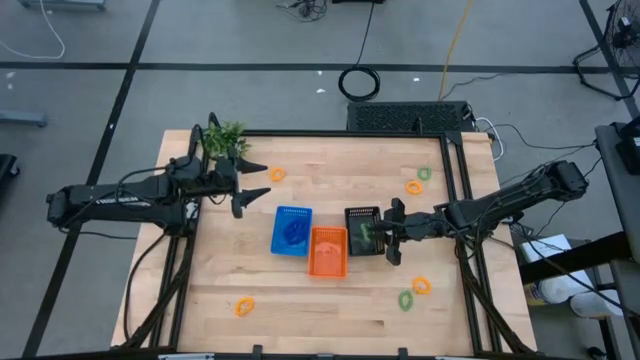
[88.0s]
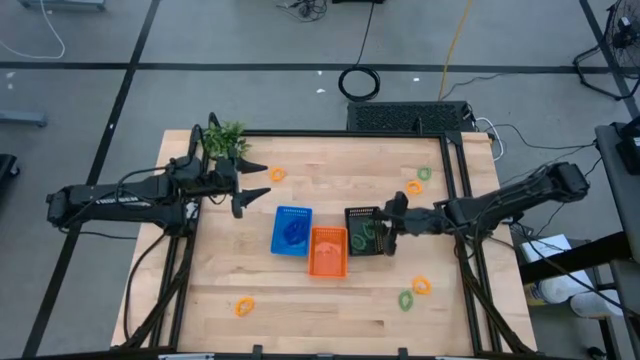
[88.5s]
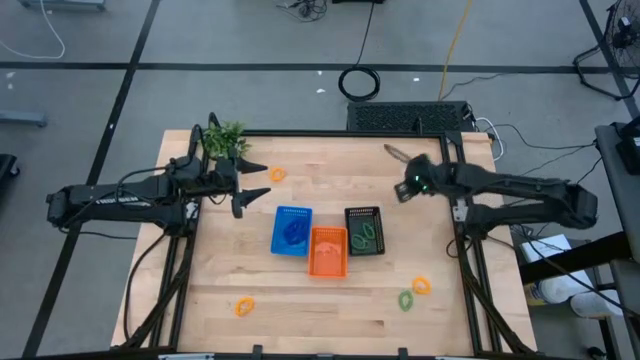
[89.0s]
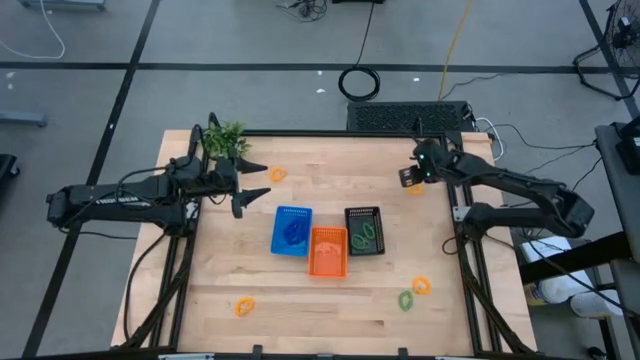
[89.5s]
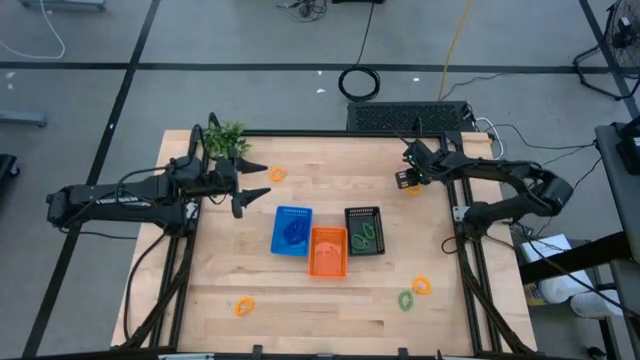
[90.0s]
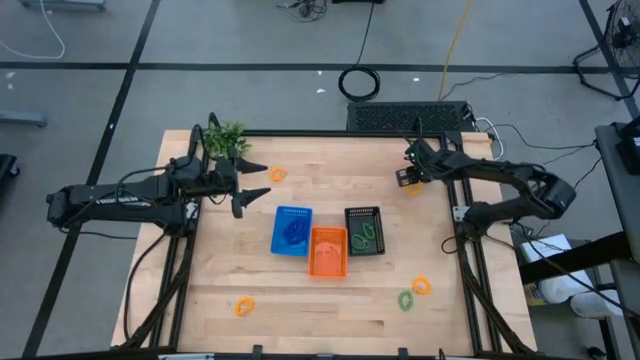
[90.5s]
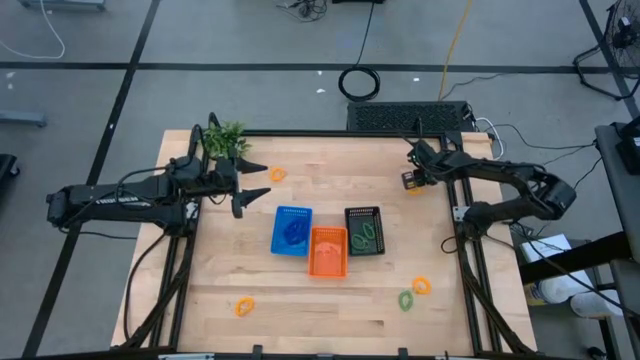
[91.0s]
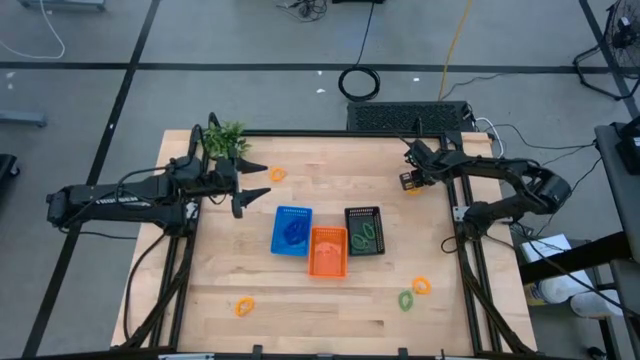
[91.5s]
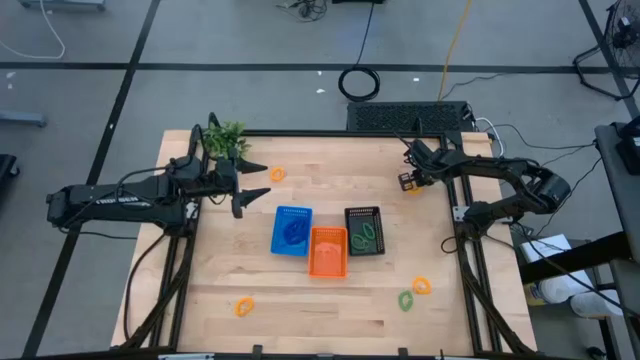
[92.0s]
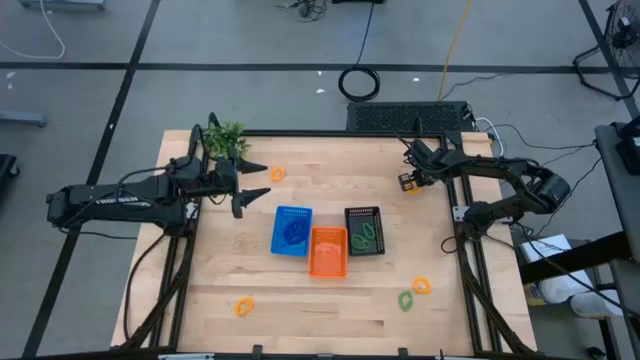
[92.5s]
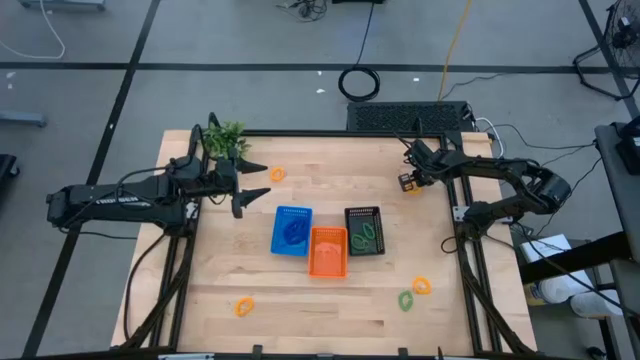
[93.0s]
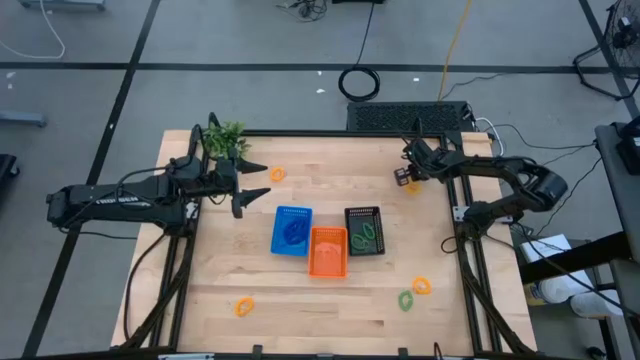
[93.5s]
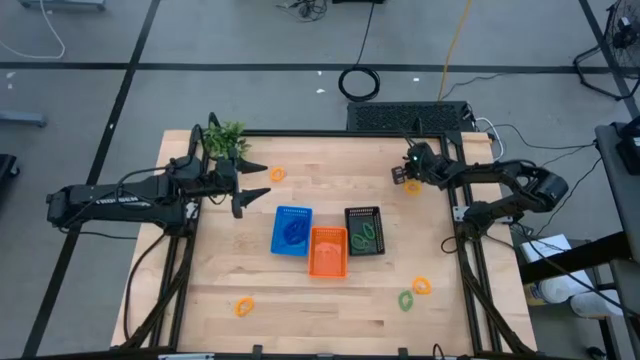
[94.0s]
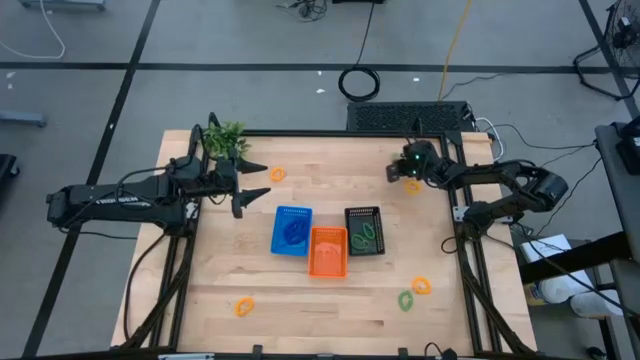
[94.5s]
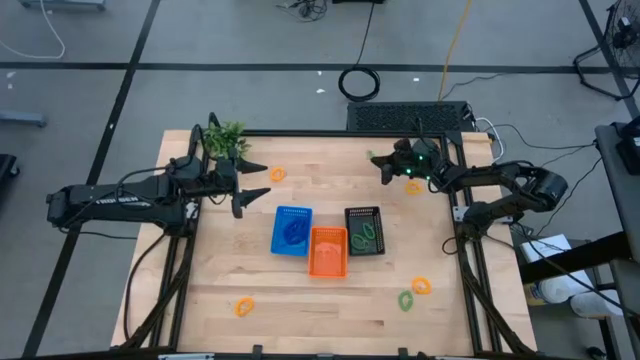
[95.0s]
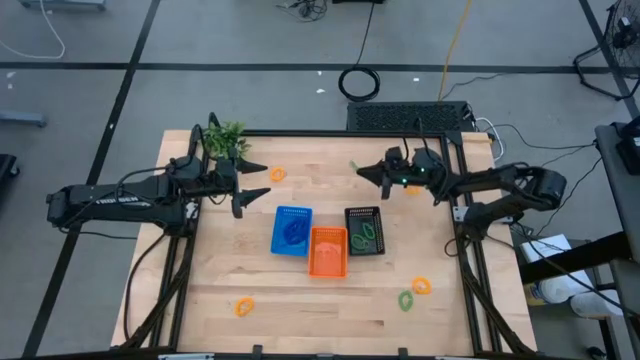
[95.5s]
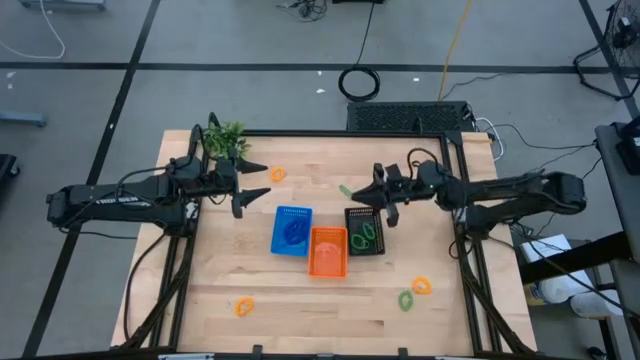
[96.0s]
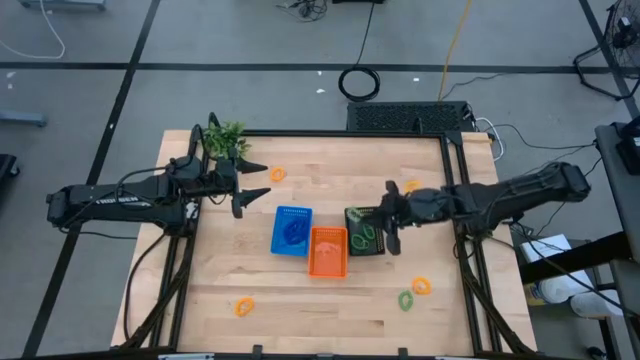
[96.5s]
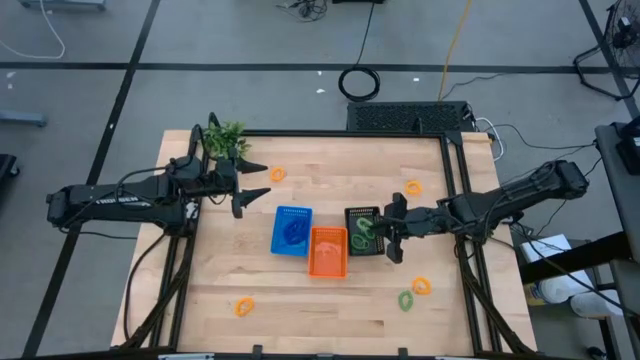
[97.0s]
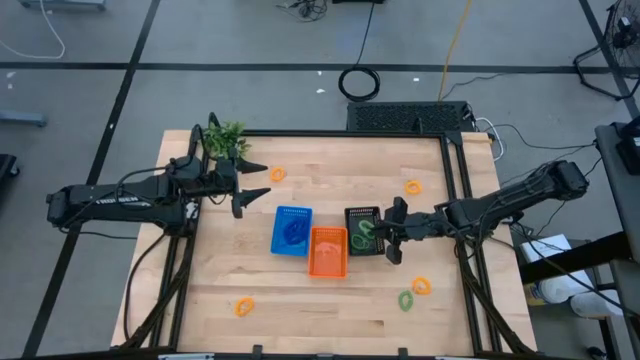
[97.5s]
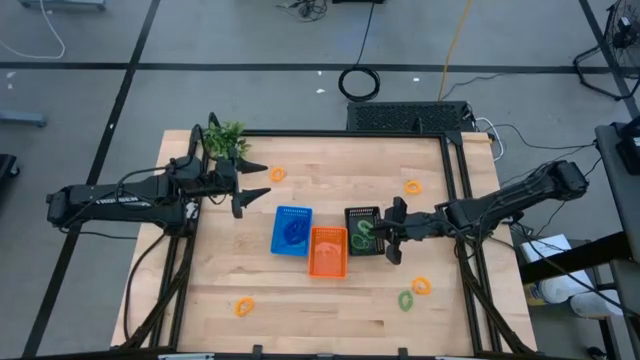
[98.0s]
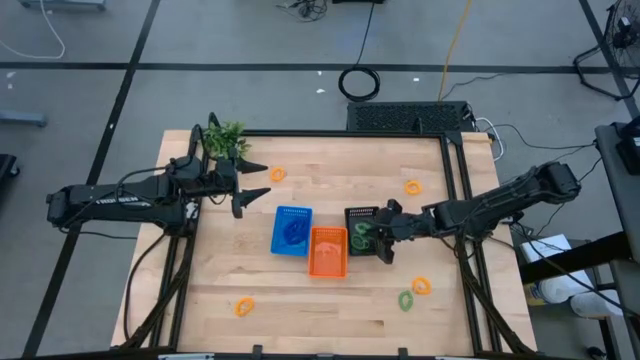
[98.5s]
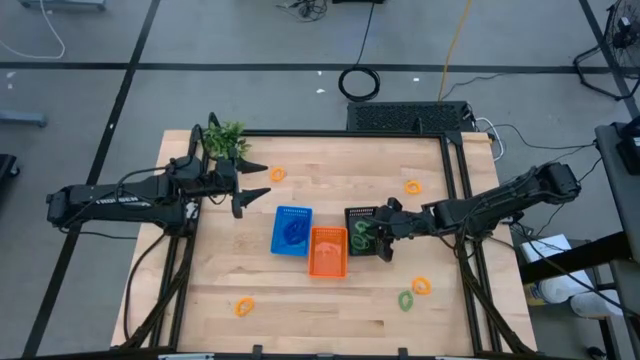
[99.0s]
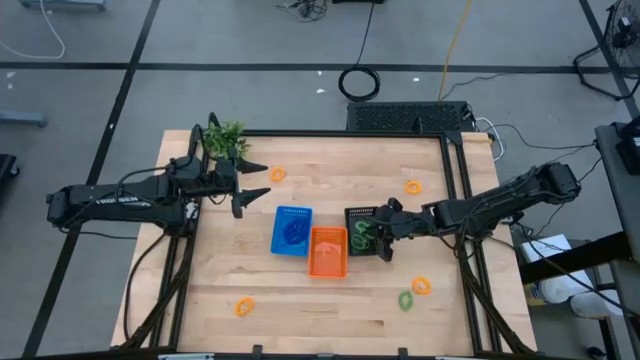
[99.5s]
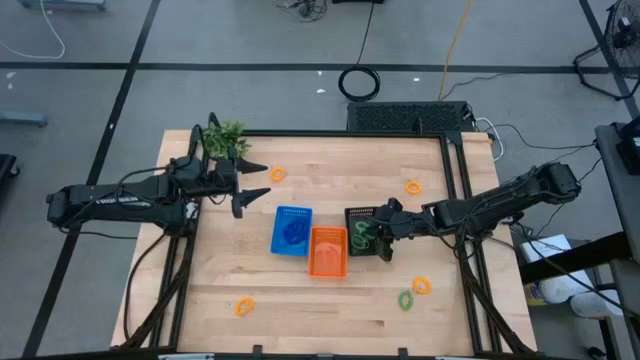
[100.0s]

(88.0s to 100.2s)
Task: Sort spring keychains
Put the green spring keychain into the black bin

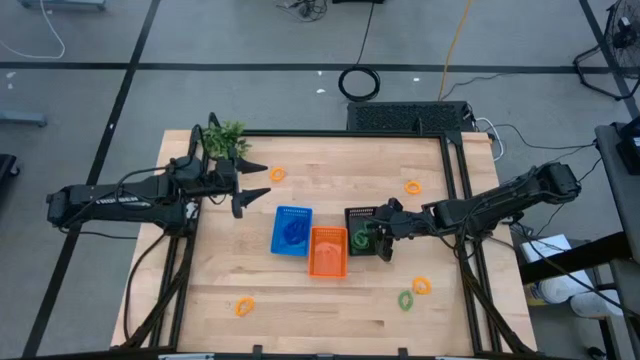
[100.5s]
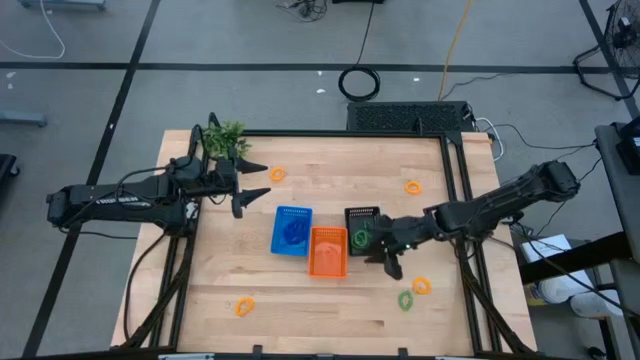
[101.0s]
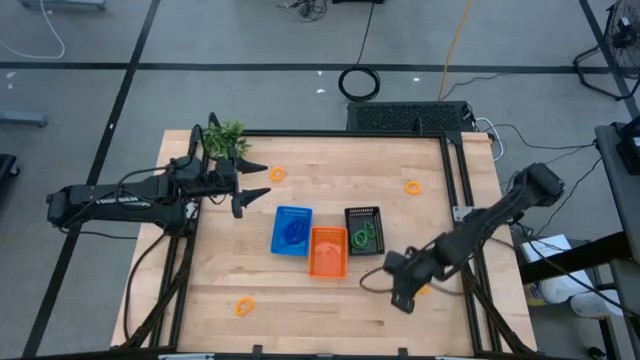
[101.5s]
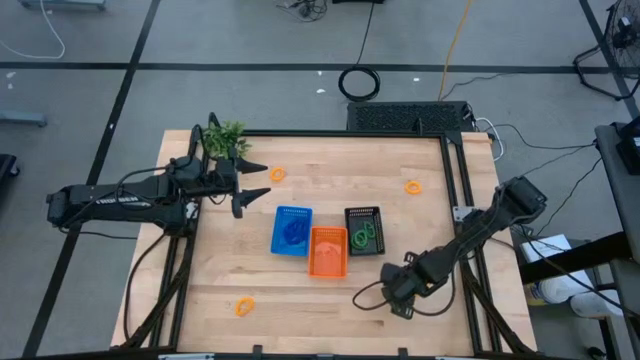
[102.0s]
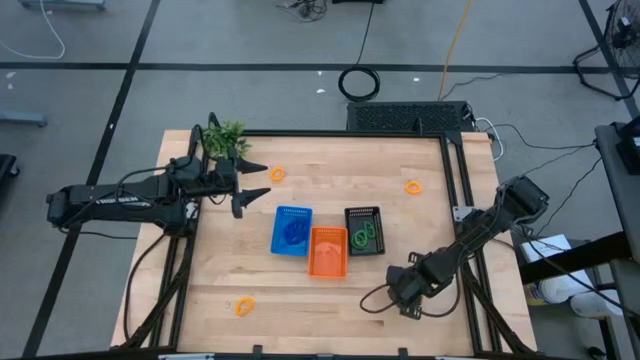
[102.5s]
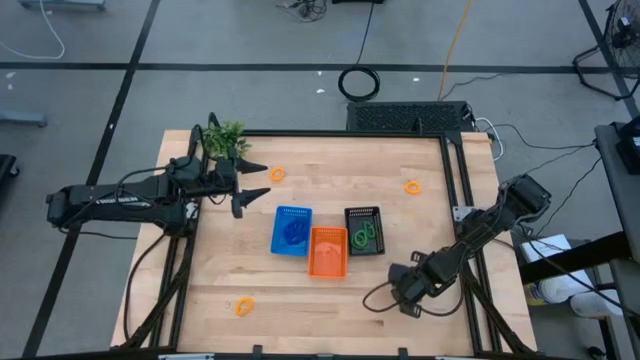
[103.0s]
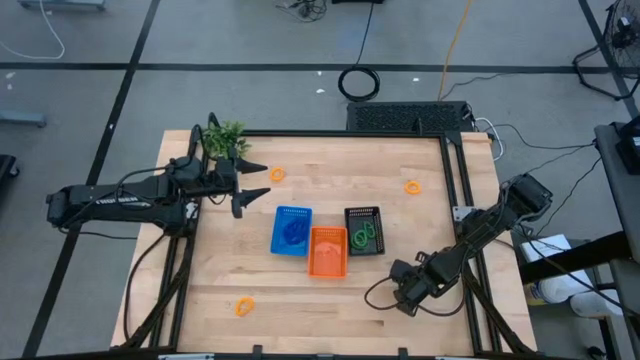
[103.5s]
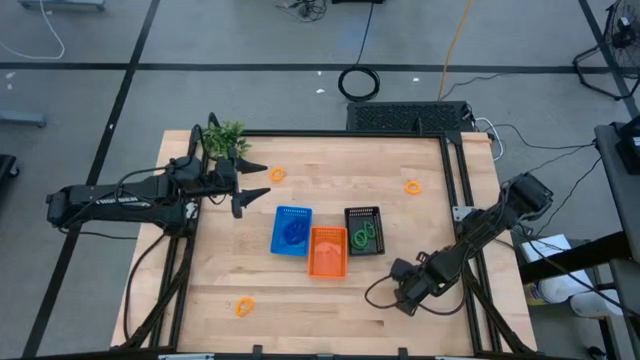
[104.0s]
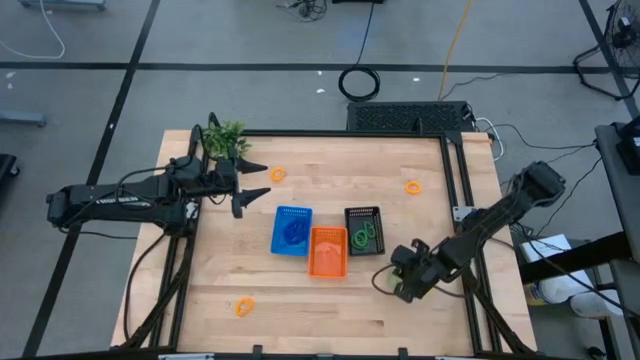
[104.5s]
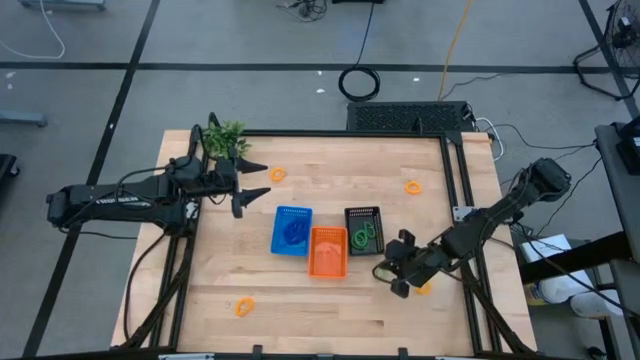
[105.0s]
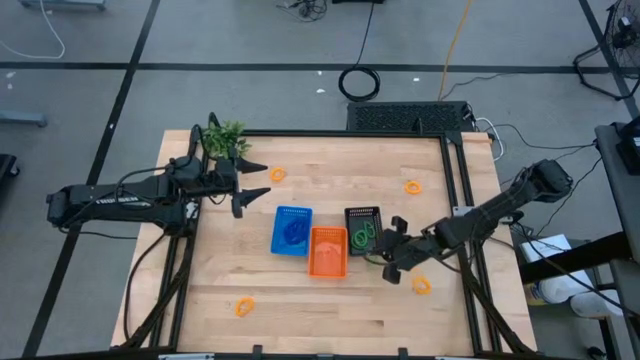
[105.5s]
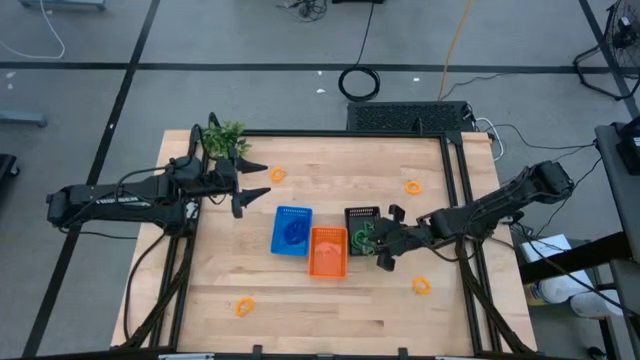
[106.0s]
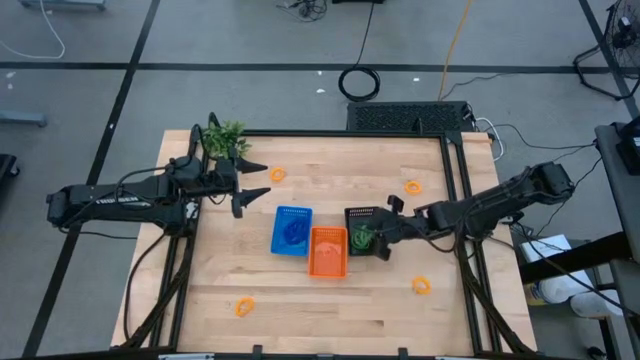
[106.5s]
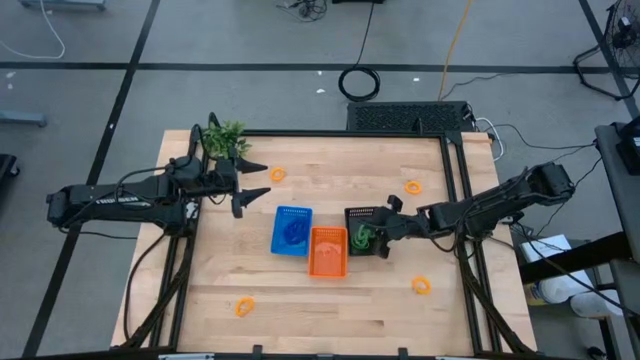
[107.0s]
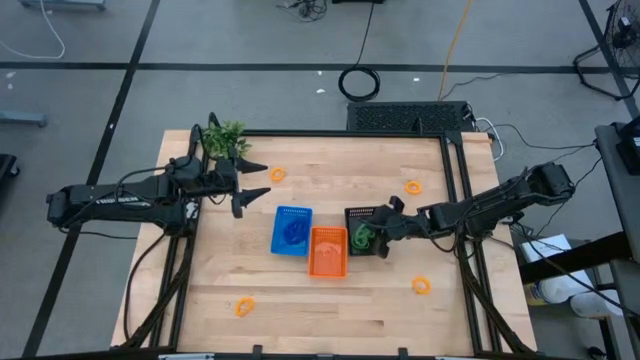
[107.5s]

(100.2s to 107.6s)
Put the green spring keychain into the black bin
